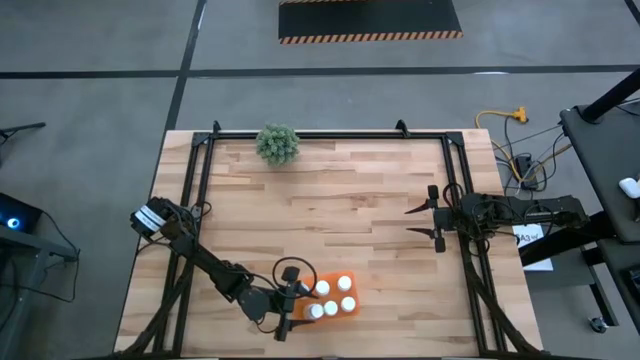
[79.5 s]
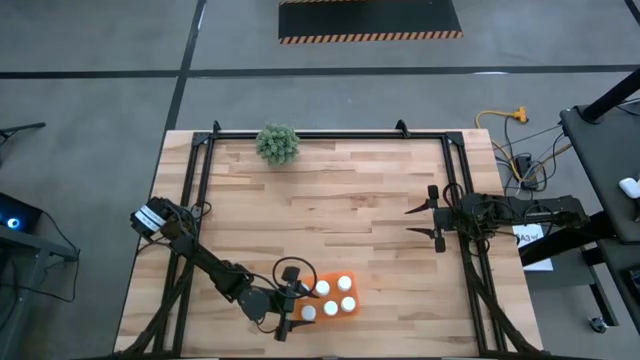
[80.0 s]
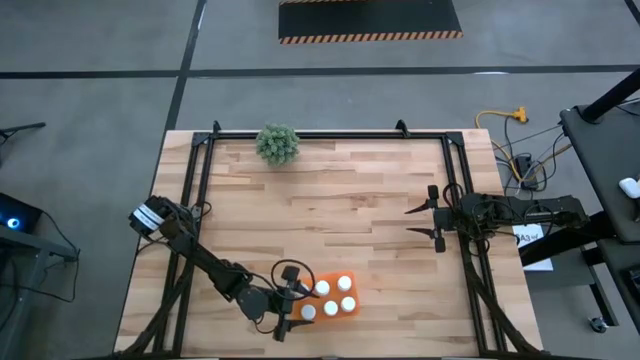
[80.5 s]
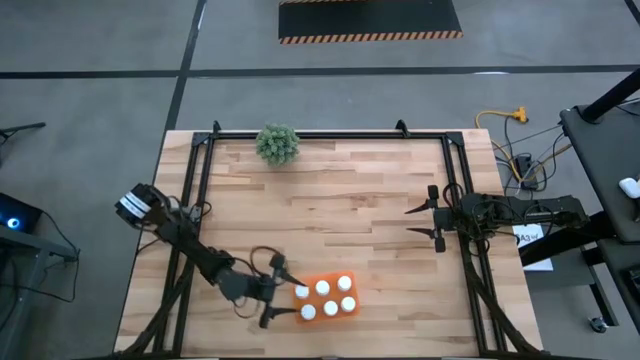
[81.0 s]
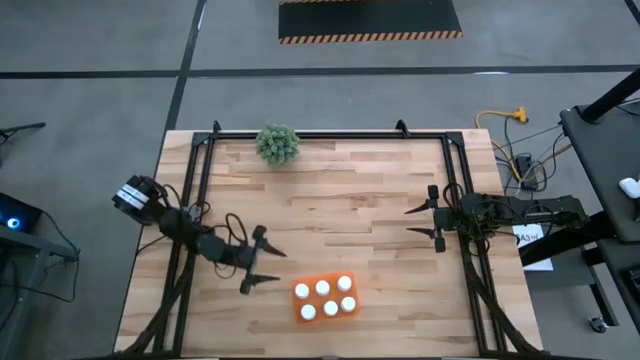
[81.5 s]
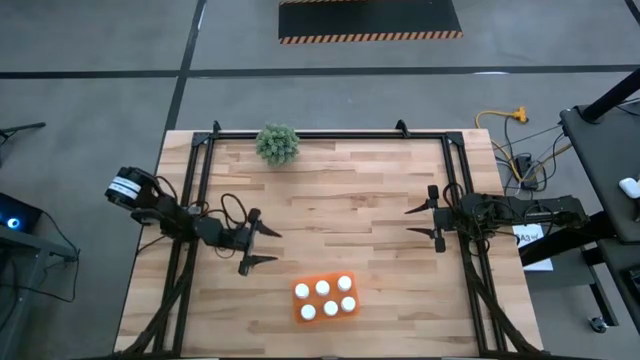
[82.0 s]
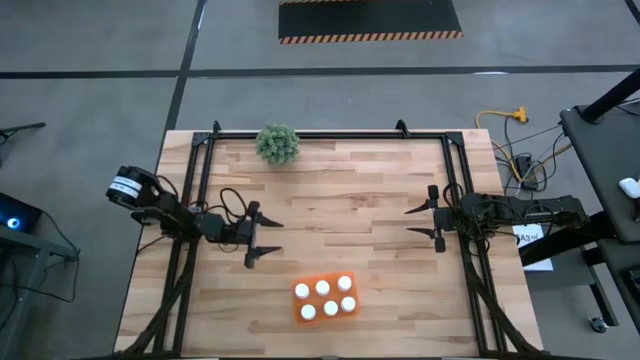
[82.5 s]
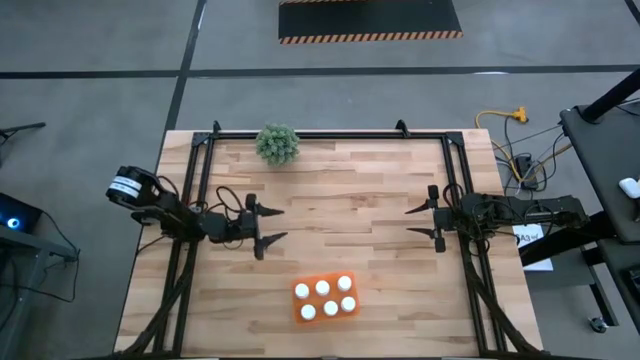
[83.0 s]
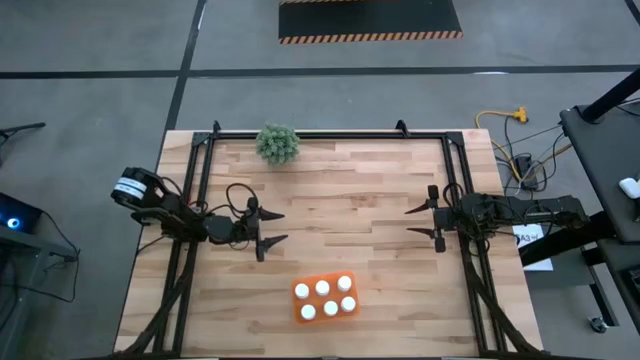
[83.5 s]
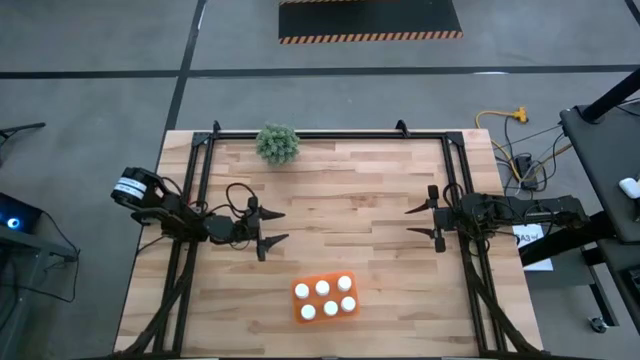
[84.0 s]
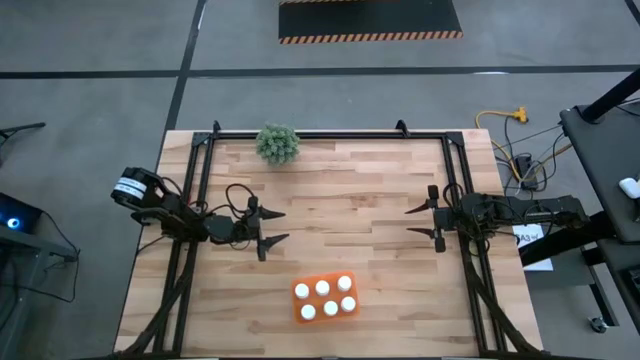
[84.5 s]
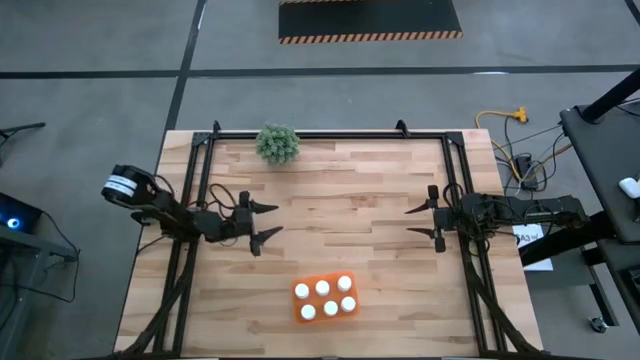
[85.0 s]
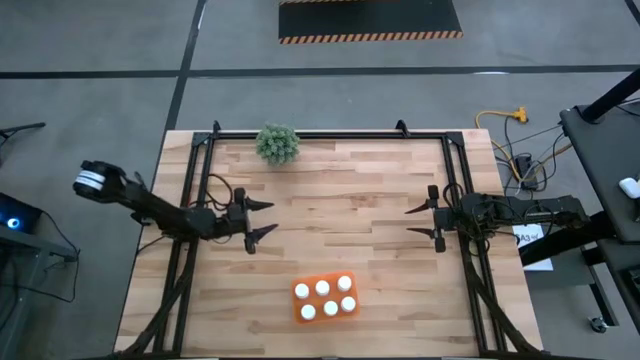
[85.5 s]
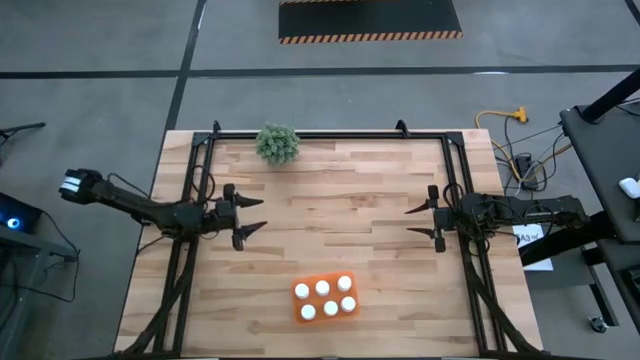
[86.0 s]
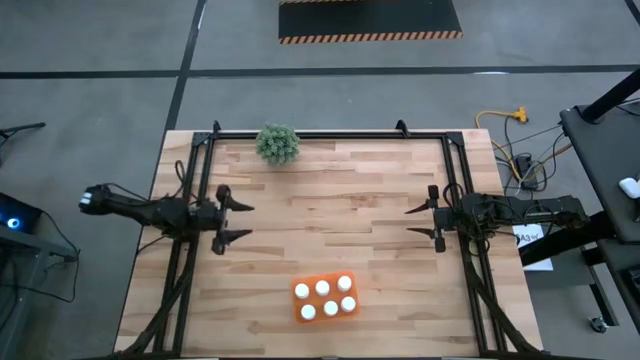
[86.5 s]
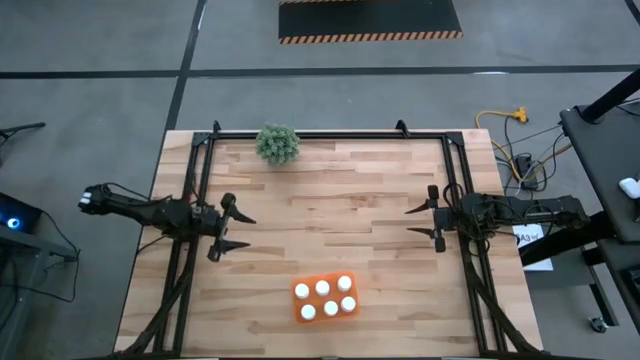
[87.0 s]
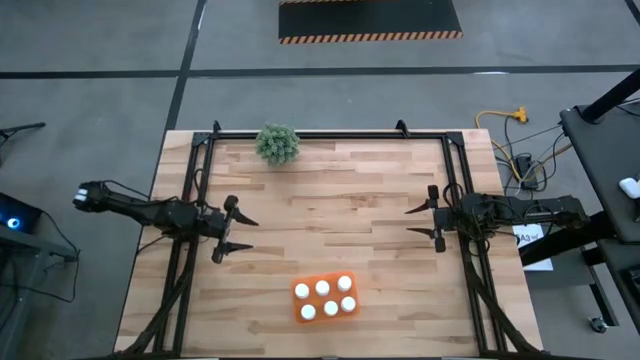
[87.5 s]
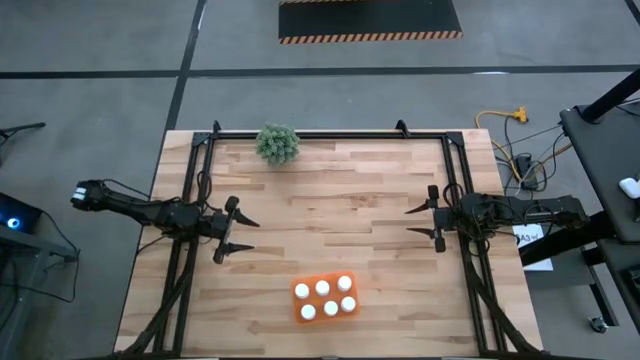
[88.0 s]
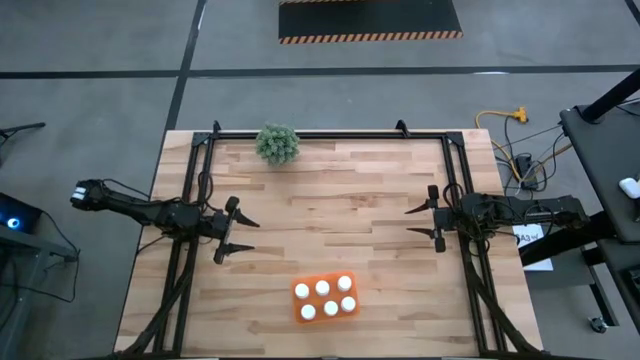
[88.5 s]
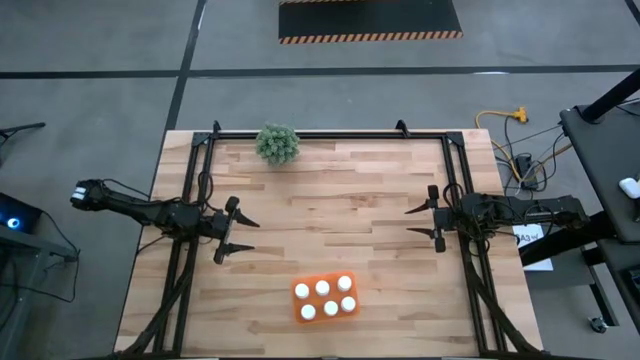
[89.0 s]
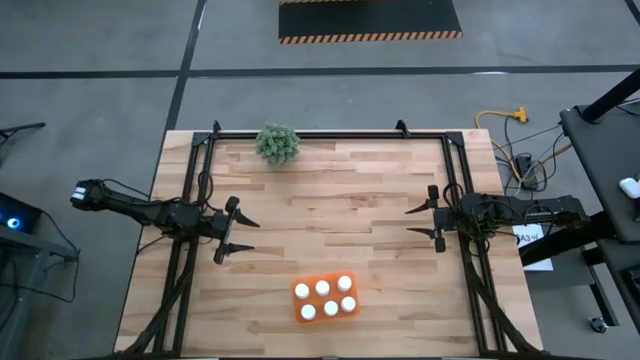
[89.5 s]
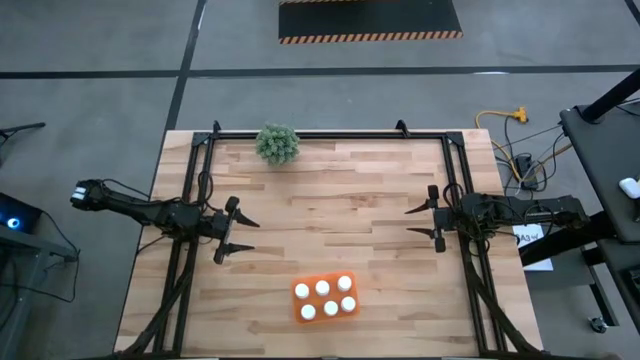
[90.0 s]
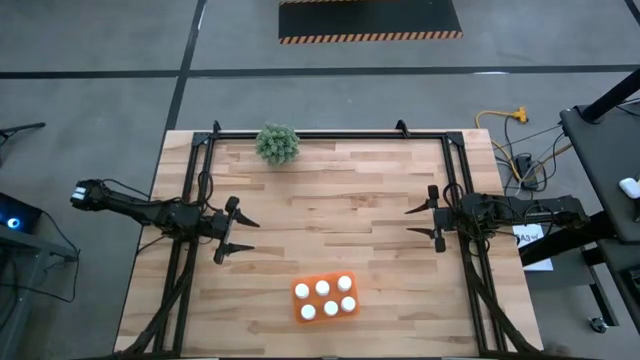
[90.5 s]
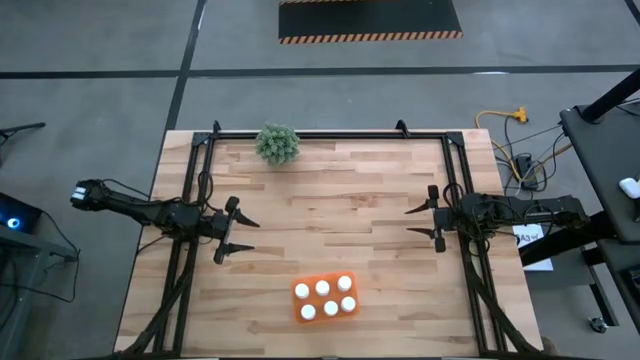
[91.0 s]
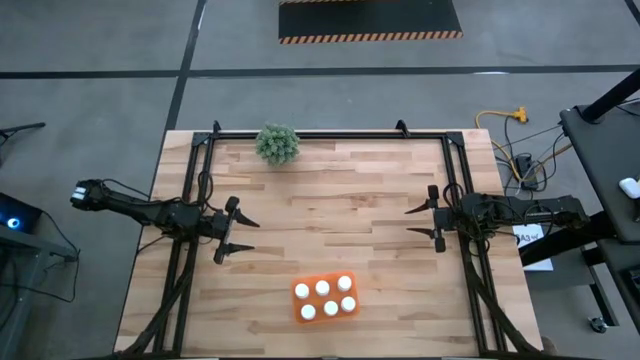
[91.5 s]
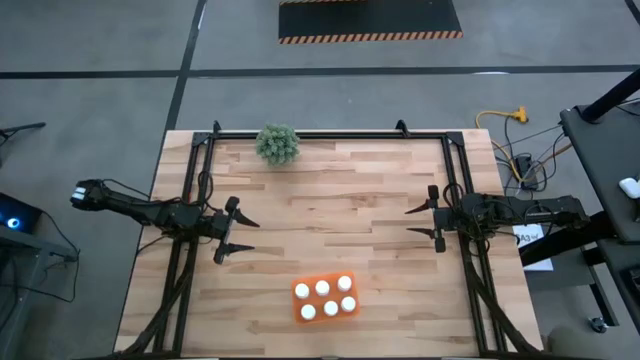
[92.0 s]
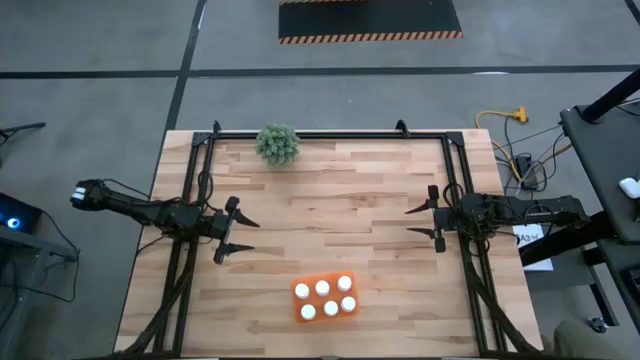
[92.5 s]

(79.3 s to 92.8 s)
Task: Pick and place pill bottles into a basket
Return to Home Position

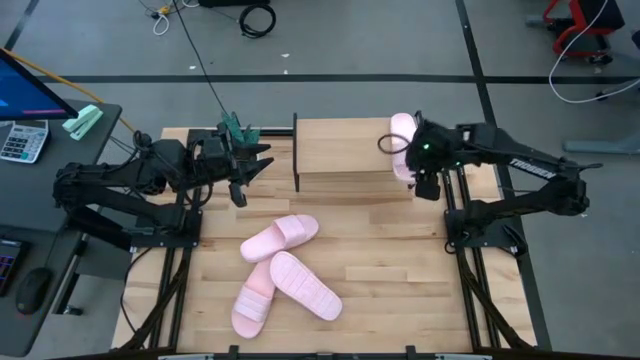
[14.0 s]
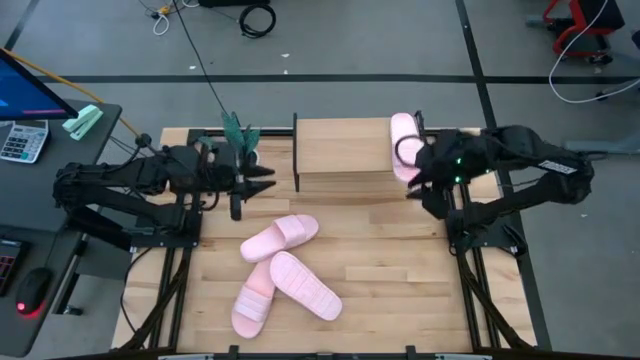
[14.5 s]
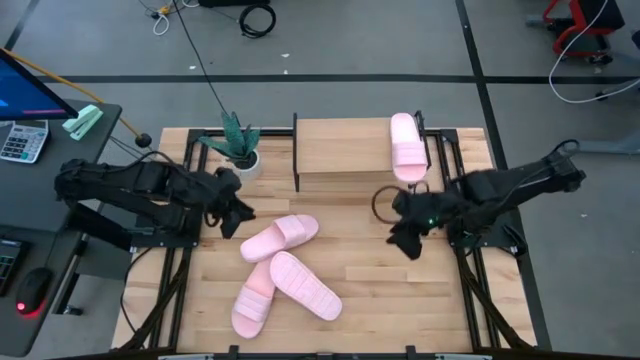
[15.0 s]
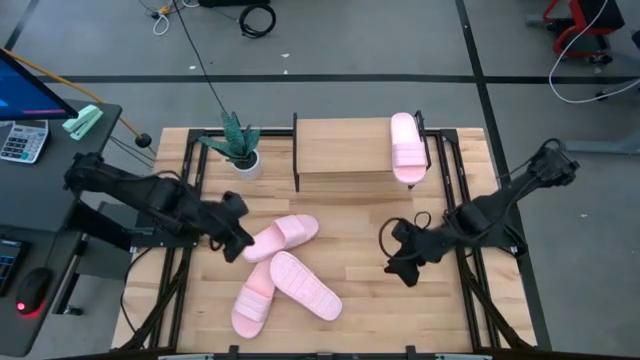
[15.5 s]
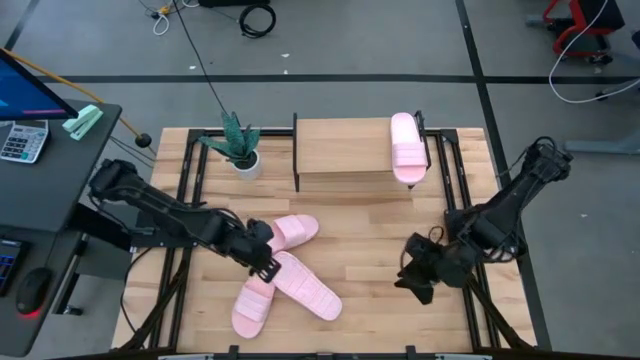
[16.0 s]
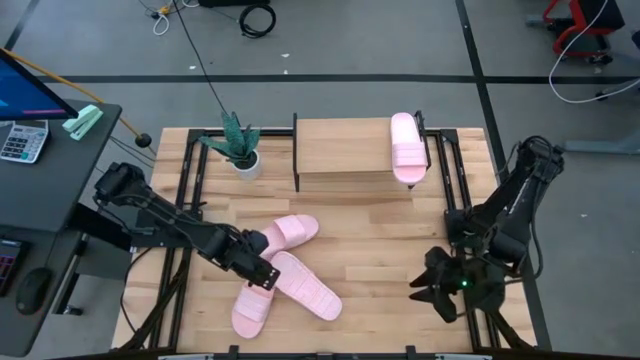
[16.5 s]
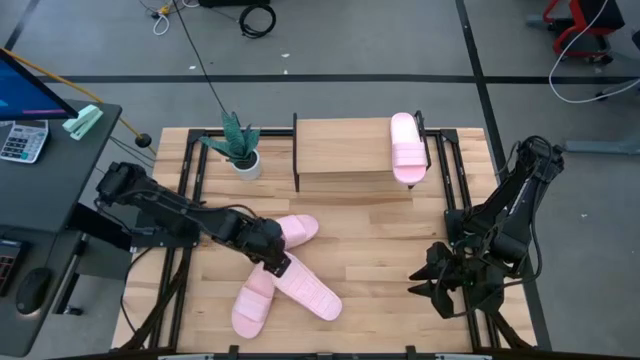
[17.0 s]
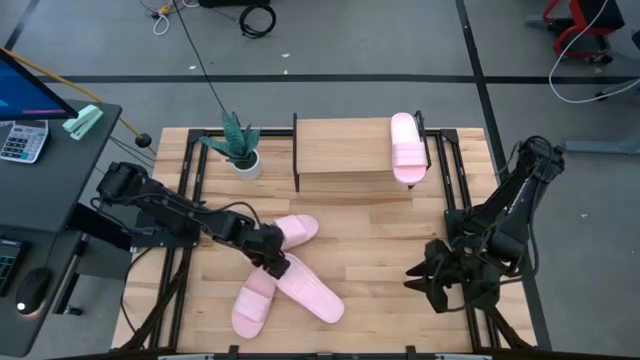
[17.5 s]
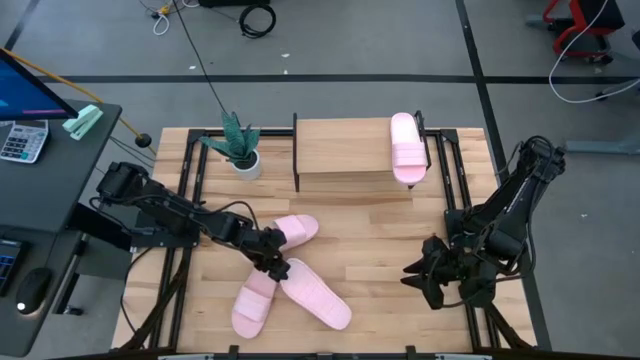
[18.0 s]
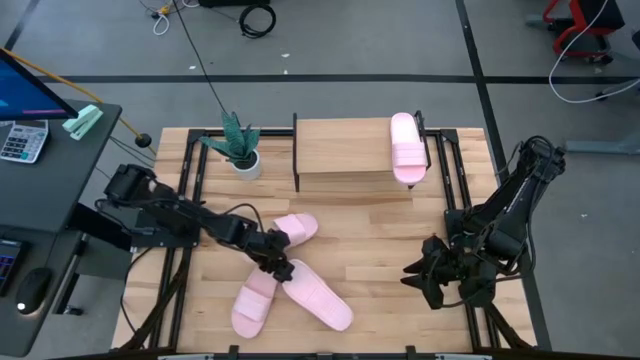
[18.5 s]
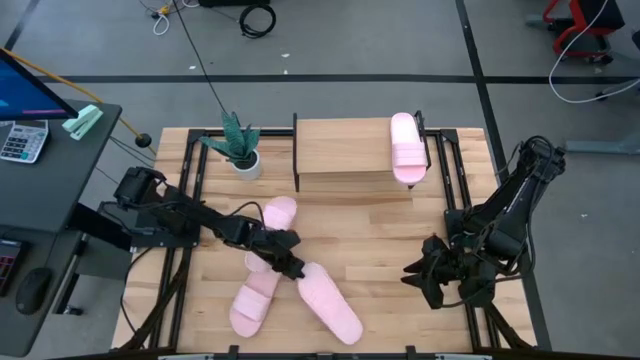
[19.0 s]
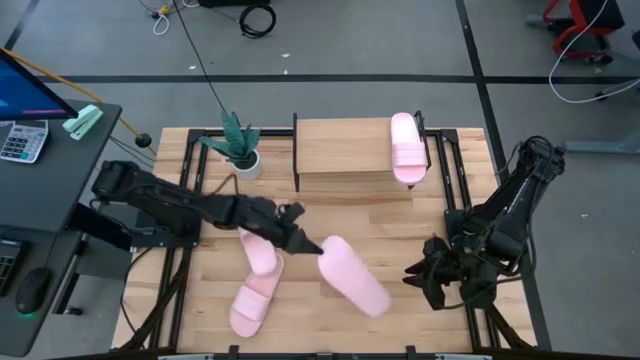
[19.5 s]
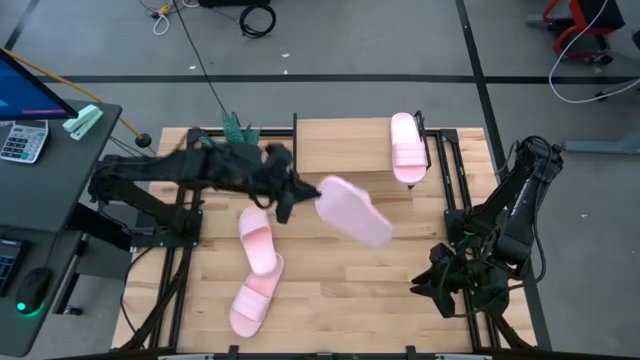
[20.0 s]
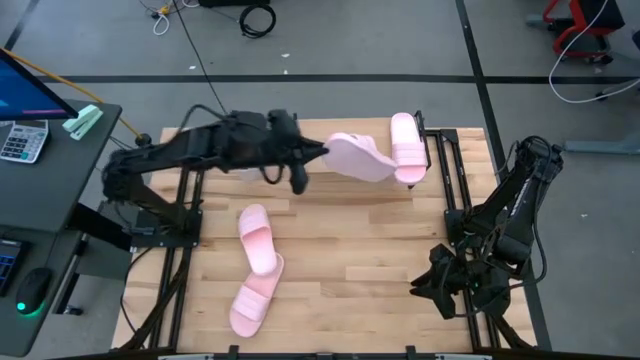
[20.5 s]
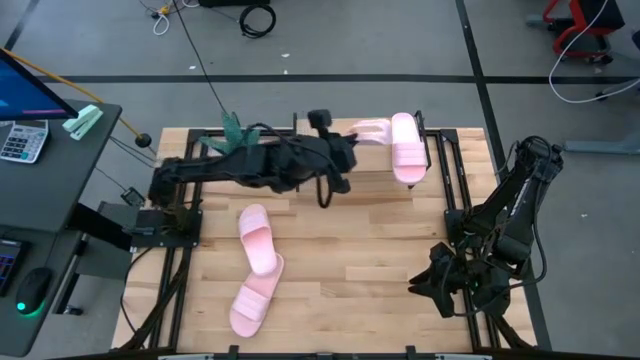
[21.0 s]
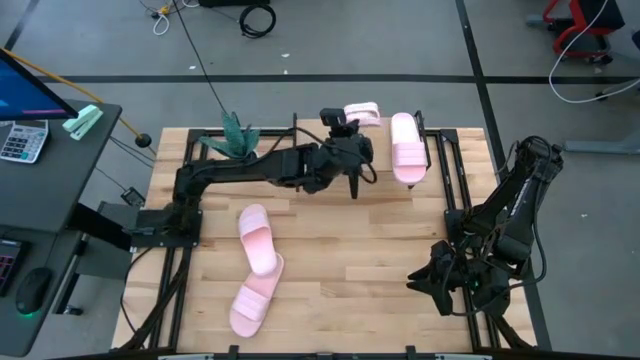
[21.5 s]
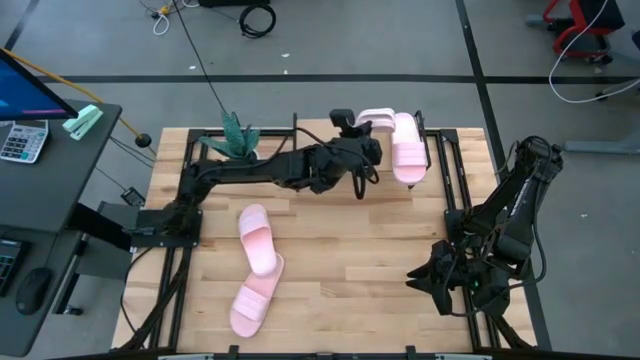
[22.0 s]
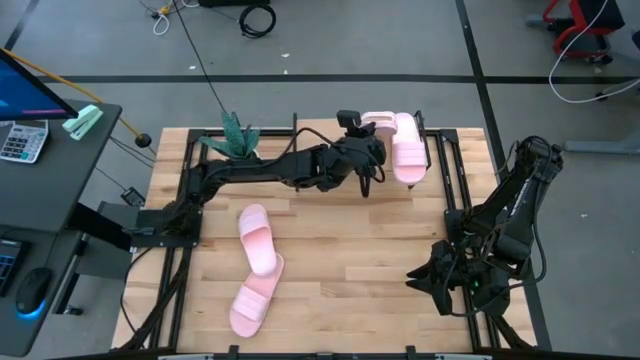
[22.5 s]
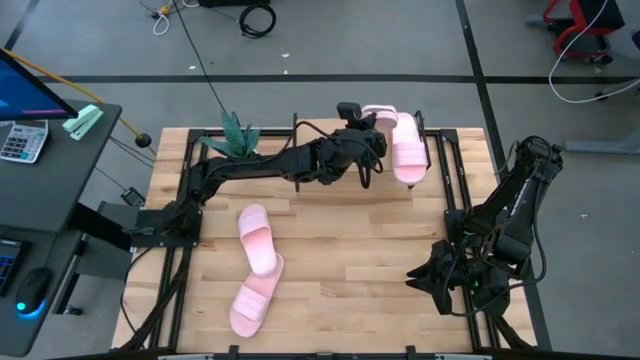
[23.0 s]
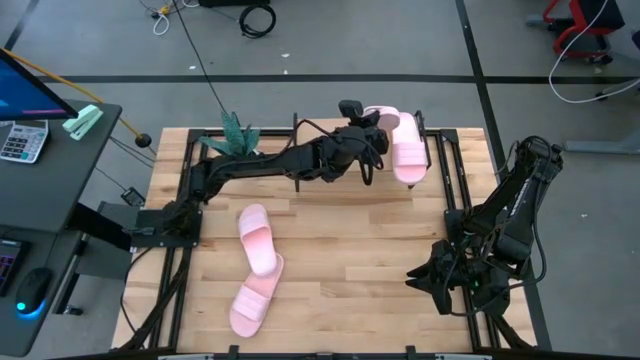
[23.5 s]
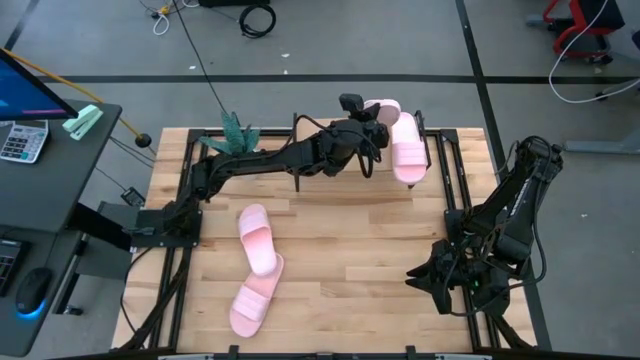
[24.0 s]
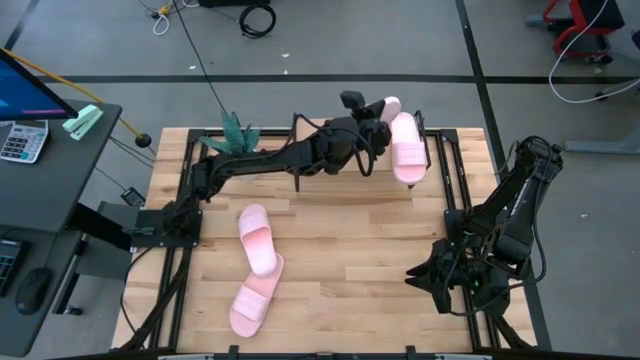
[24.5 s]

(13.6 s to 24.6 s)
Task: Pick and place slides into the shelf
Put the pink slipper on the shelf
